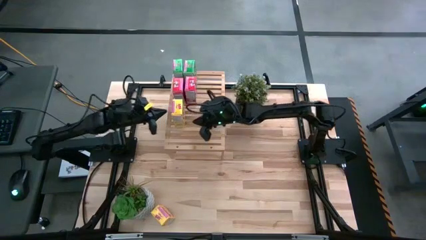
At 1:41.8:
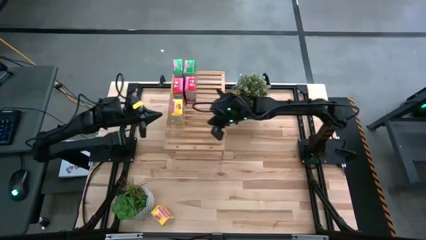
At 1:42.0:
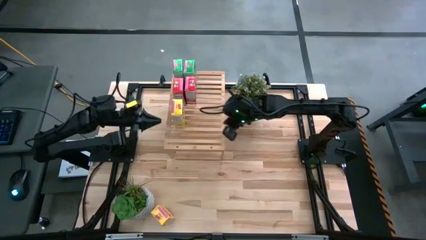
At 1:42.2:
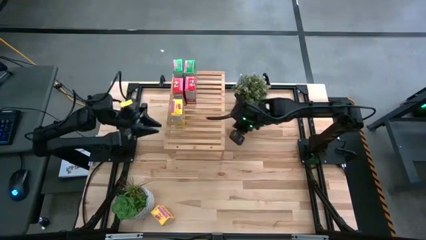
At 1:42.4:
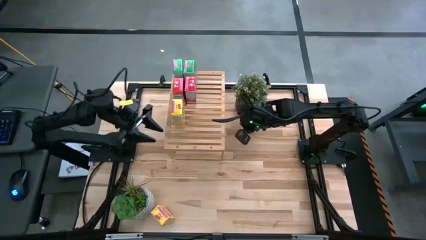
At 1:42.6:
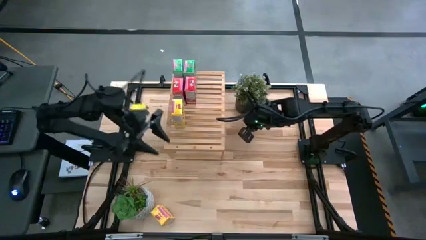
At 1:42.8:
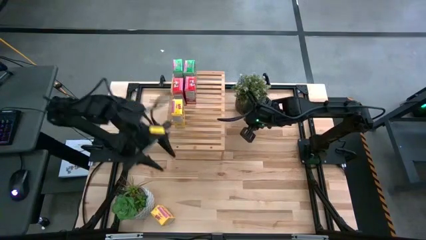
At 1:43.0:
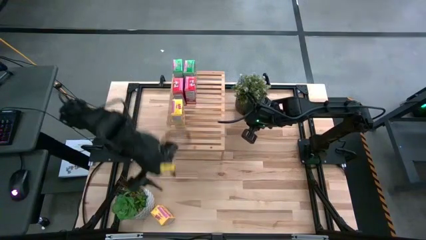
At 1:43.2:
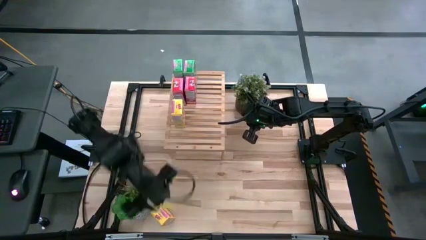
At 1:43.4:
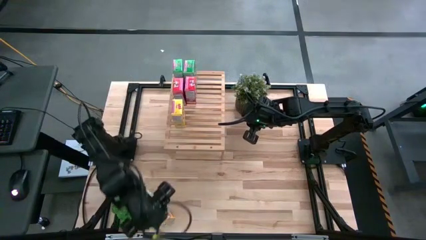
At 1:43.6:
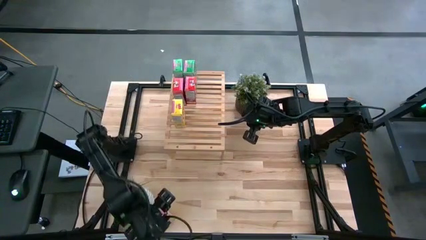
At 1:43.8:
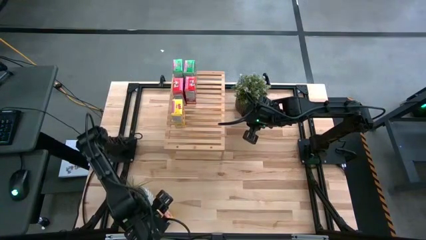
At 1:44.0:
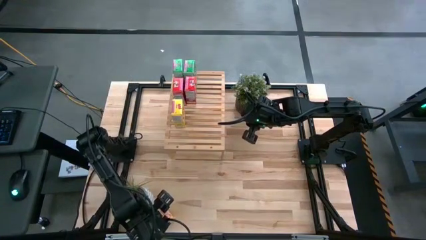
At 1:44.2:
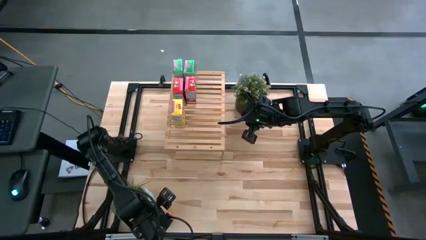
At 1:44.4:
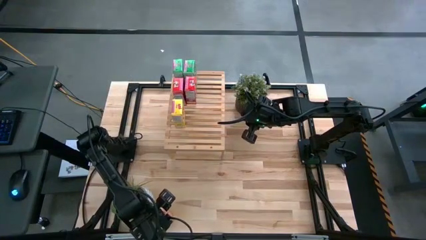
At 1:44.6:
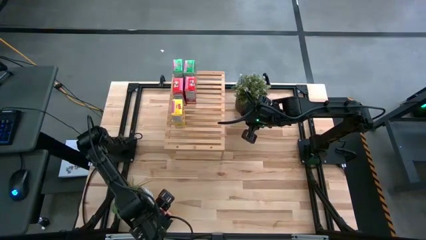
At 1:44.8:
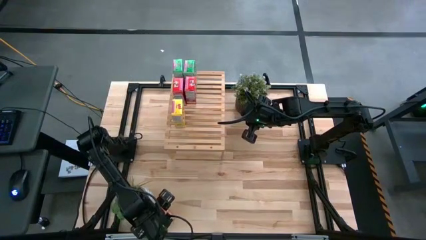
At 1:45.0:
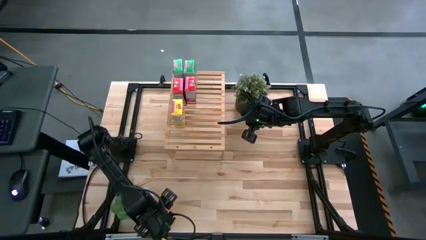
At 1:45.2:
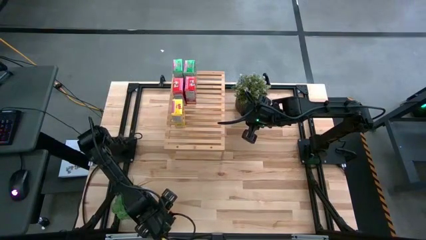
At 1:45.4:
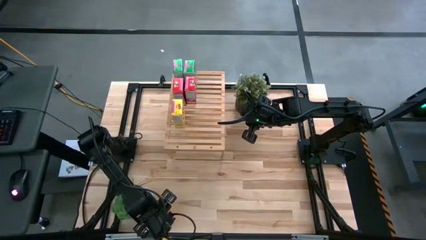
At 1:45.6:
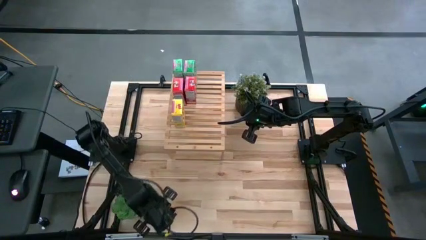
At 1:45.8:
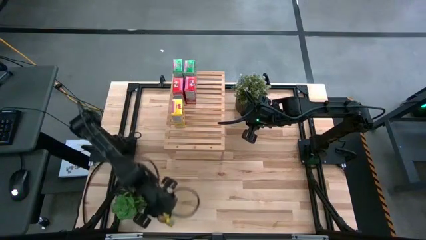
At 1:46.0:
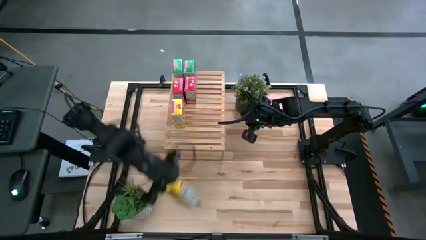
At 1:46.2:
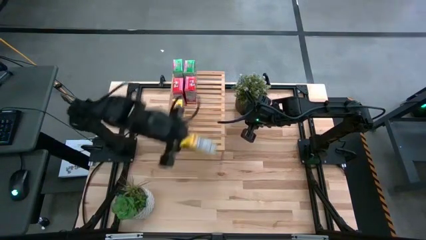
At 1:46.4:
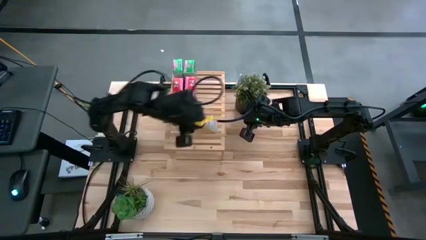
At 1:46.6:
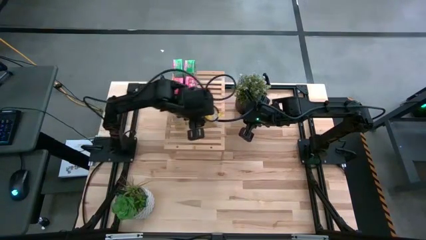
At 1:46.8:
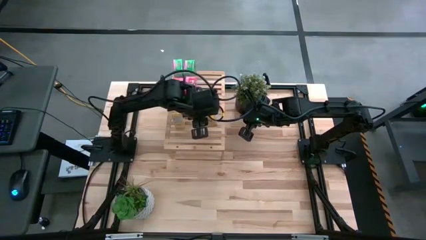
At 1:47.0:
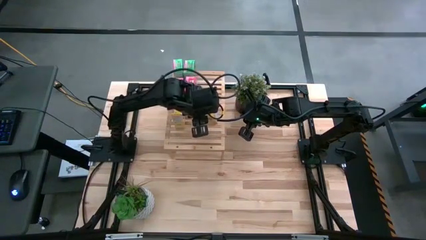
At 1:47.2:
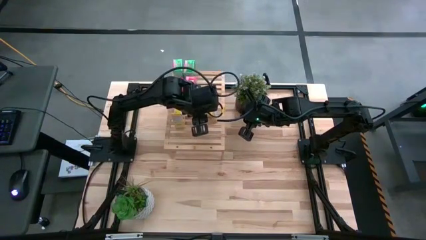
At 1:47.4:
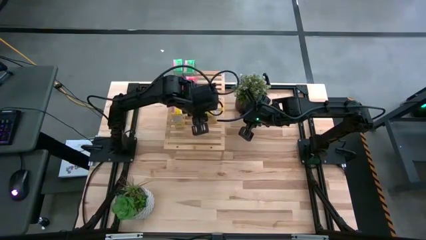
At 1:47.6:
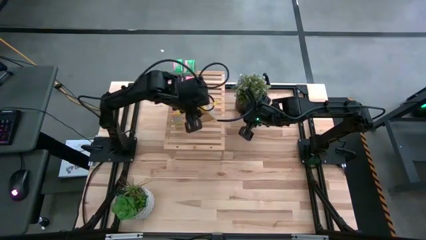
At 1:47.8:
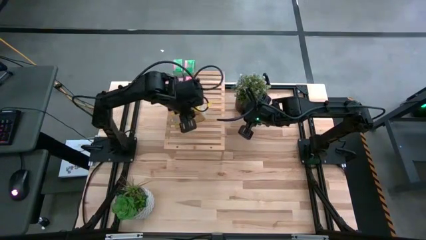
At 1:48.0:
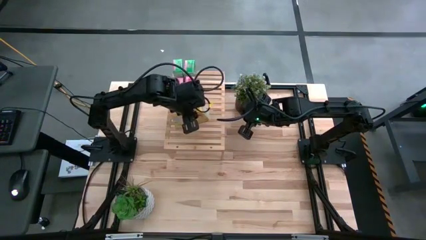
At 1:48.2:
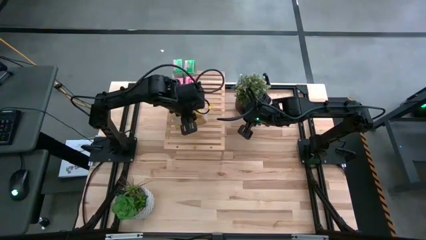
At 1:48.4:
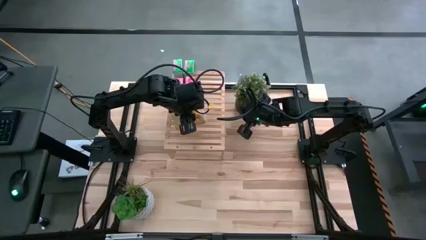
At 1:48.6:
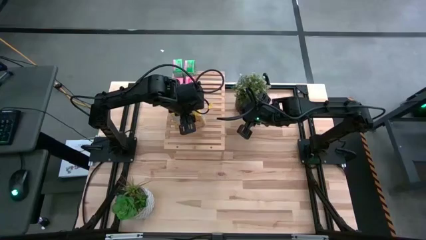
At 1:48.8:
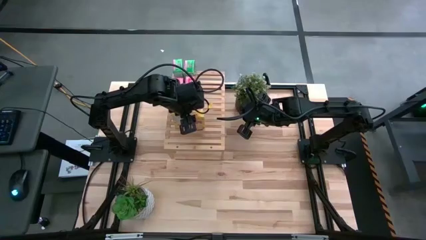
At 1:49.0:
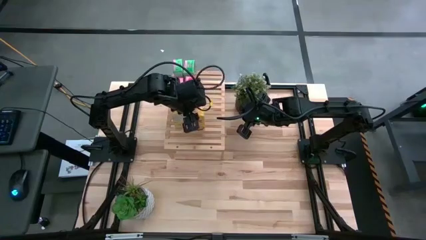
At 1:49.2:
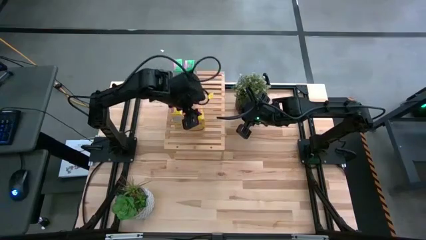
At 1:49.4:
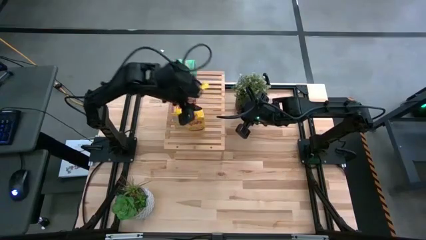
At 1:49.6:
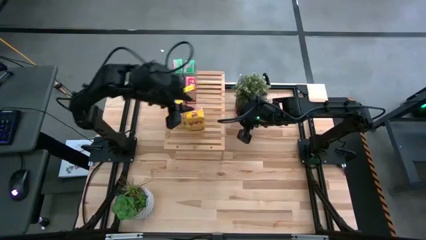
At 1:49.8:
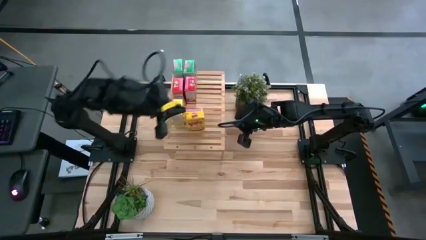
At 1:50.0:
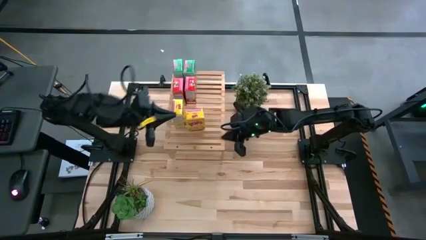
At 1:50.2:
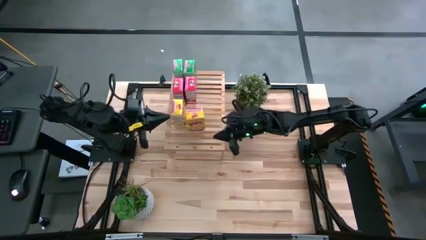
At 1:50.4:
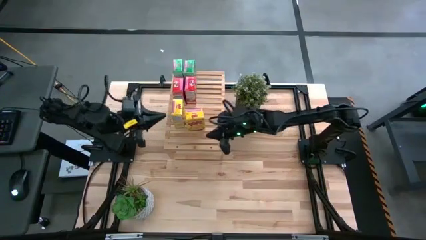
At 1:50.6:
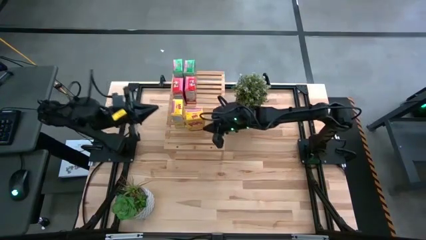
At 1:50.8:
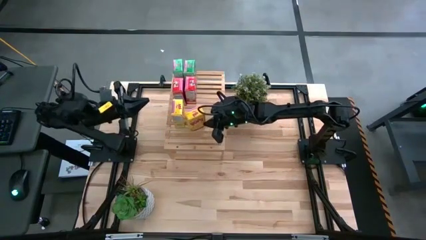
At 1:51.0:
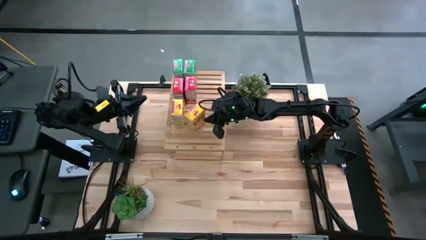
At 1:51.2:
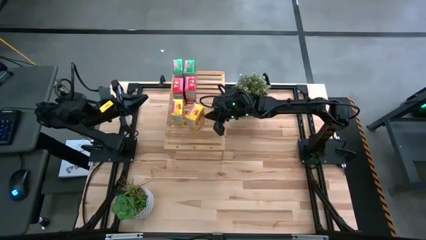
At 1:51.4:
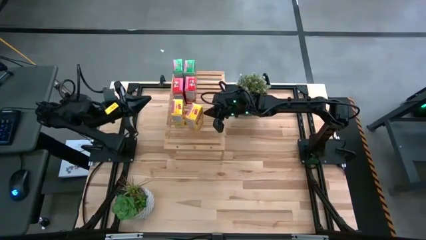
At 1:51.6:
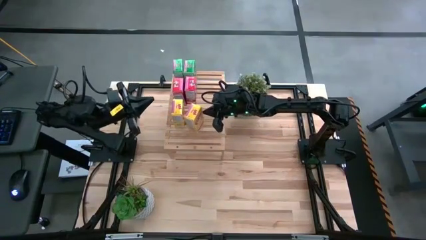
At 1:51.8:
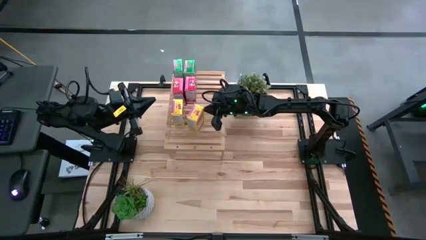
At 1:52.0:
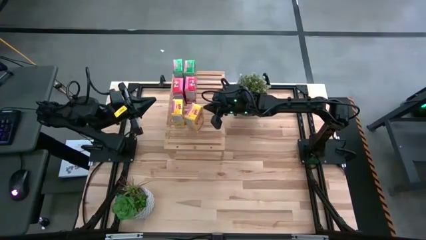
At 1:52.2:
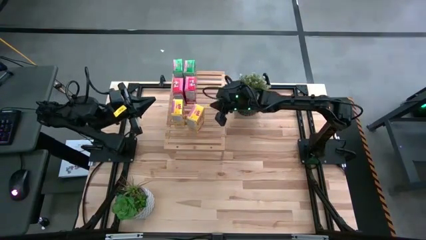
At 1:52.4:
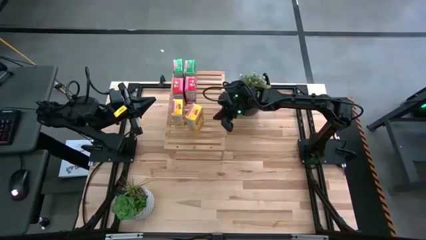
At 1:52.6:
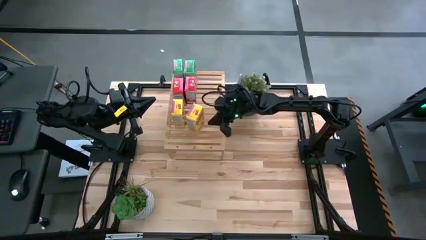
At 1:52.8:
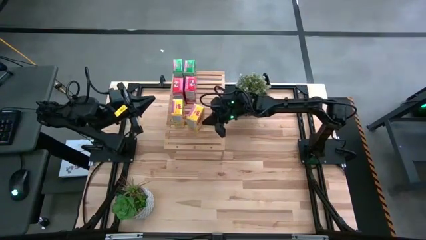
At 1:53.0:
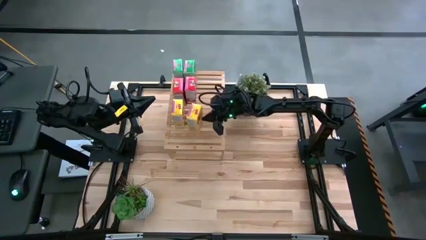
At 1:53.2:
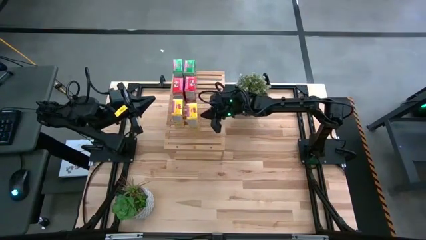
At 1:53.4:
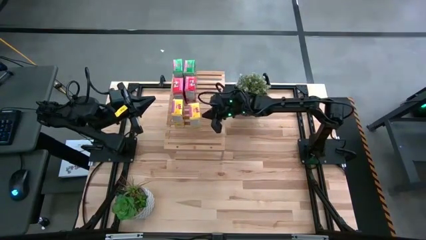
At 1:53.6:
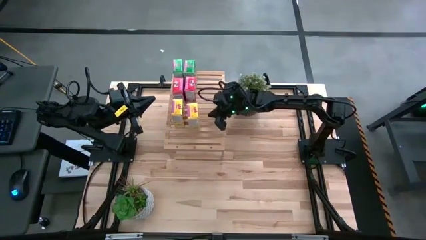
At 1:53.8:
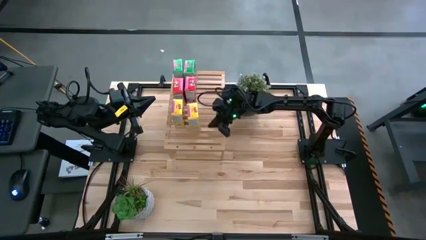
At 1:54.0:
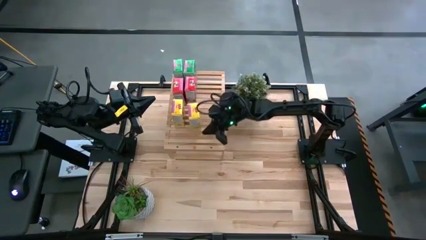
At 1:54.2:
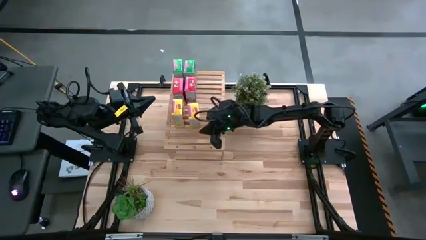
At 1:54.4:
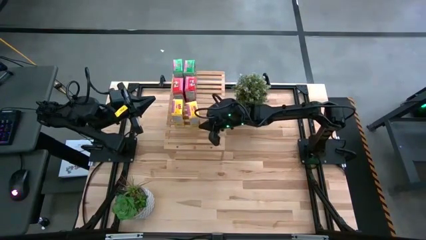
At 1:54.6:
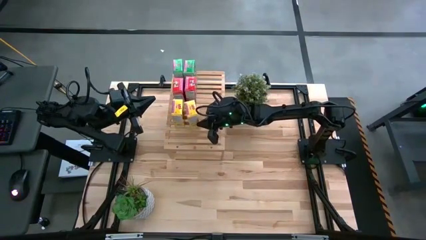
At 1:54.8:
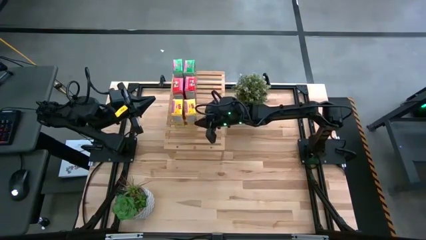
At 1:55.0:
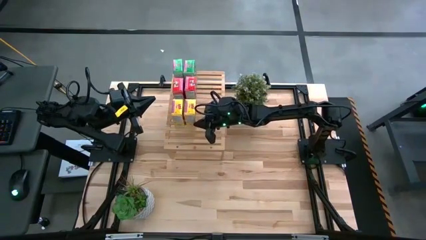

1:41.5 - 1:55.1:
Task: Stack cereal on shelf
Put the yellow cereal box on the shelf aligned with the other yellow cereal box
